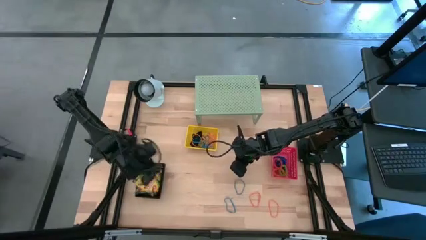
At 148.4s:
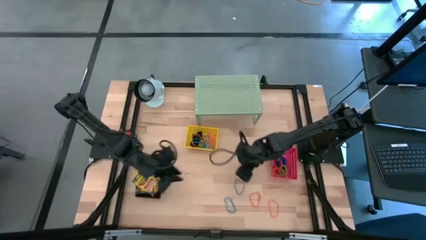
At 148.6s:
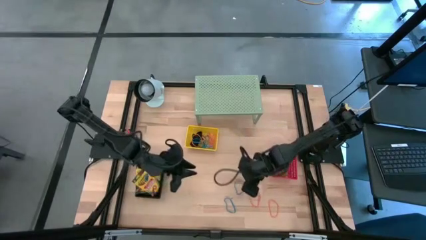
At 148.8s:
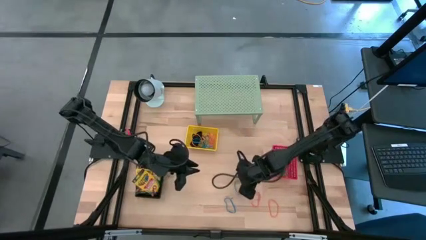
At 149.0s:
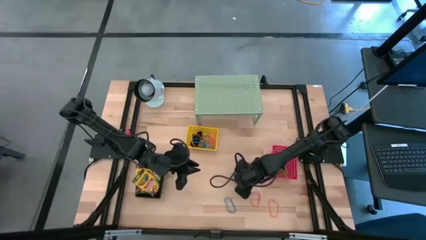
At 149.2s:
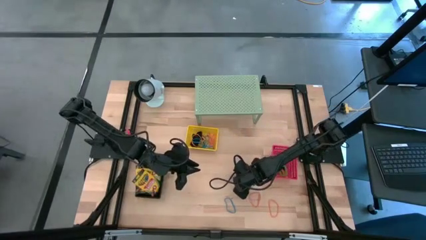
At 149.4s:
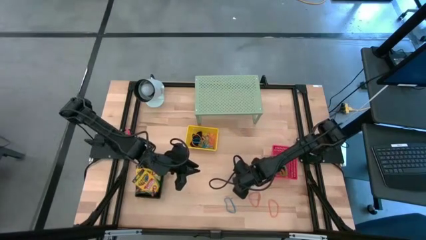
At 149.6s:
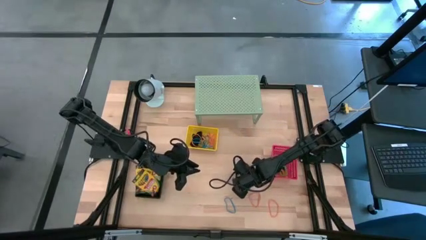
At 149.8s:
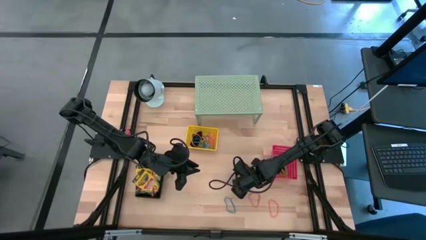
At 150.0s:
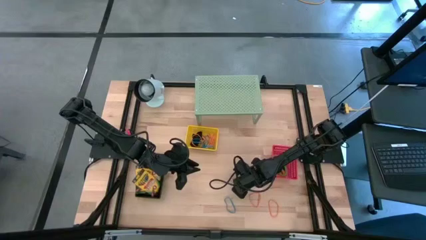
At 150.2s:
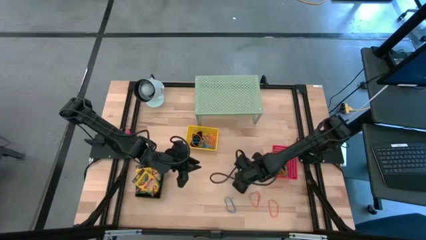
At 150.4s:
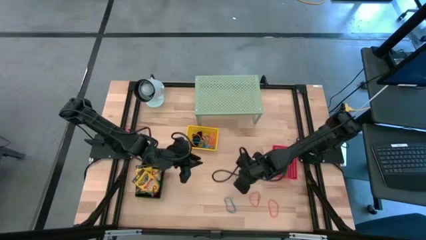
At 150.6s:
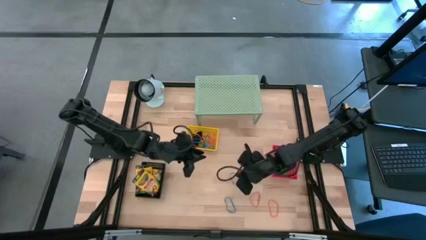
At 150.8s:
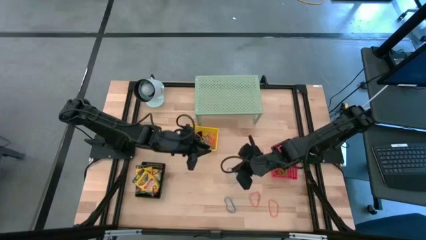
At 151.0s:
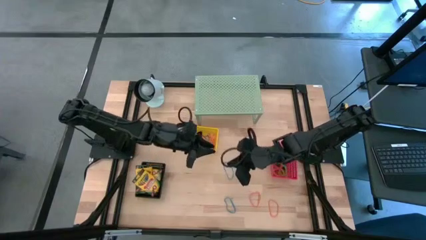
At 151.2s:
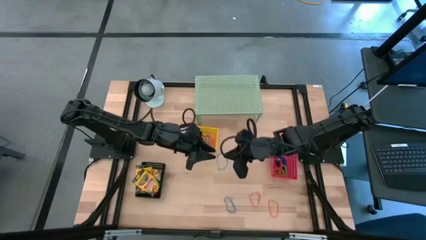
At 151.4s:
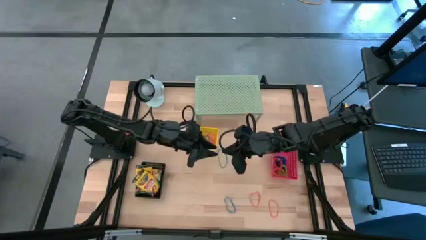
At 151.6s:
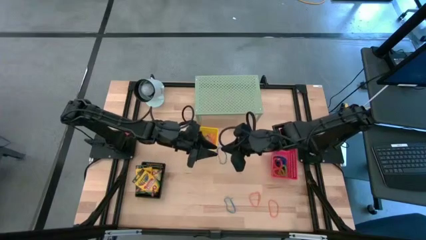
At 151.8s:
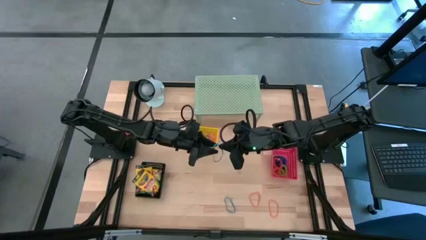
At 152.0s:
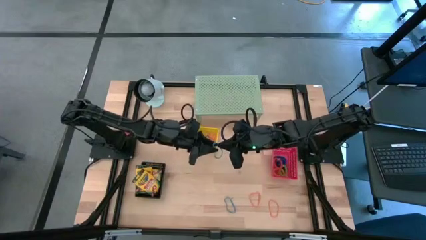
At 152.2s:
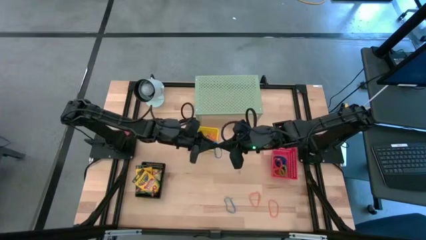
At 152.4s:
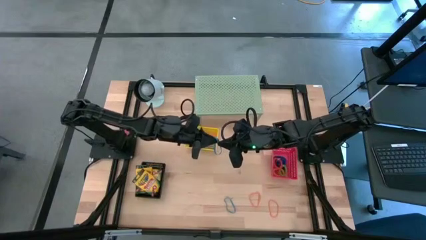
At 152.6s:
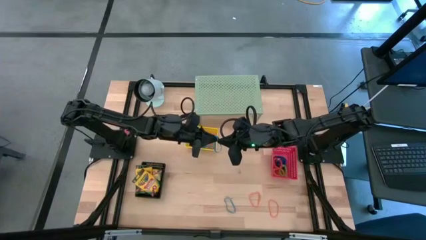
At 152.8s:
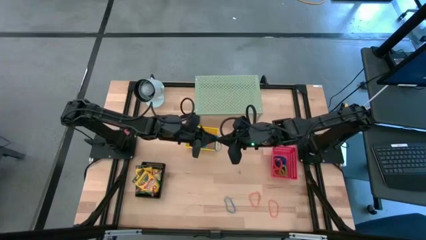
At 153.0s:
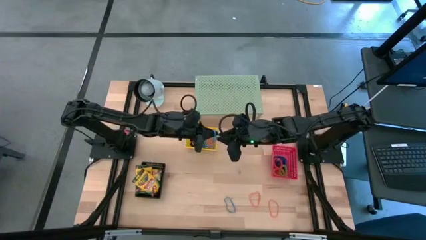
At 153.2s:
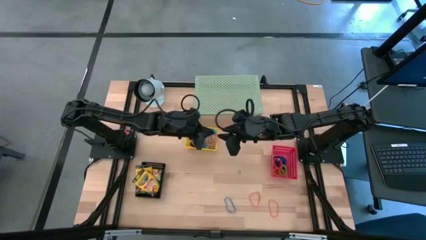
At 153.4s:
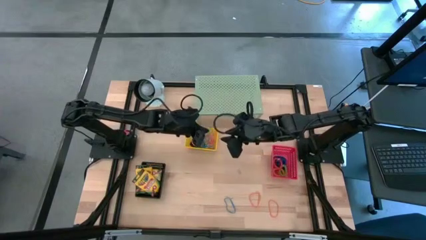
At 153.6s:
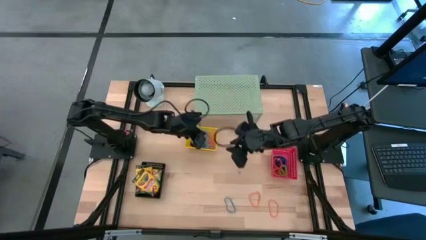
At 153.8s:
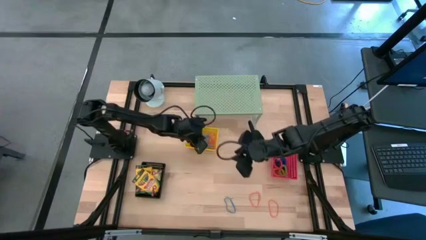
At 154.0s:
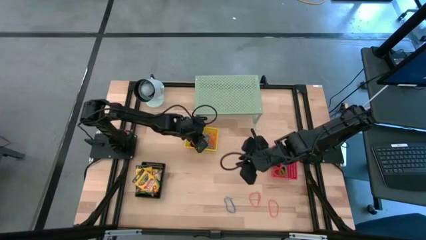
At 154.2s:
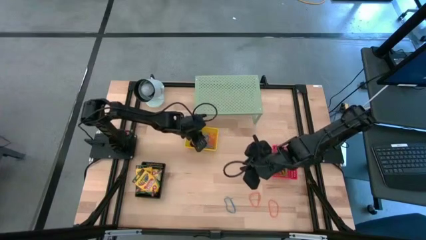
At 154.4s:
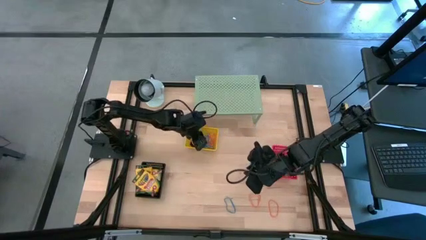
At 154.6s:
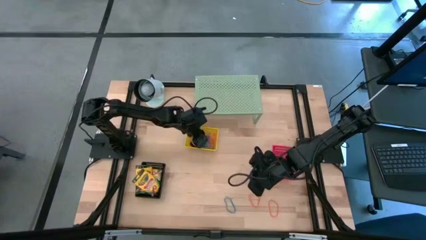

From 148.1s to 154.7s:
Task: Pick & Place Office Desk Supplies
Put the blue rubber band into the yellow bin

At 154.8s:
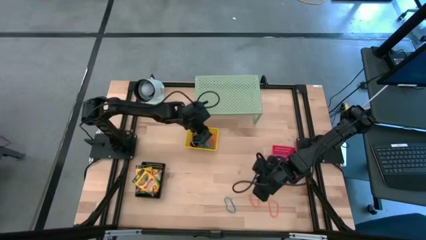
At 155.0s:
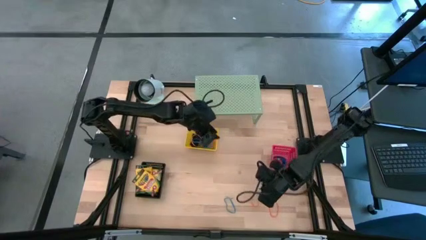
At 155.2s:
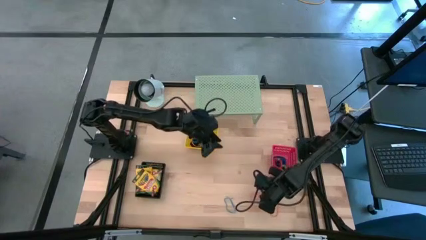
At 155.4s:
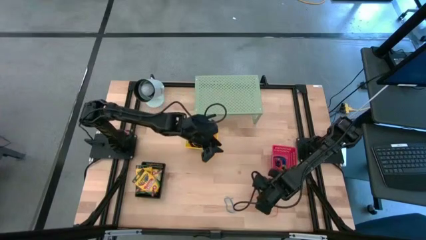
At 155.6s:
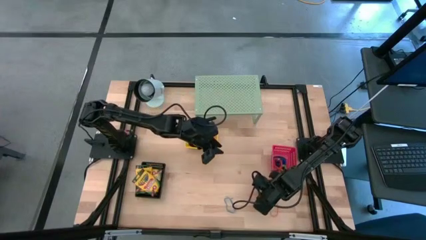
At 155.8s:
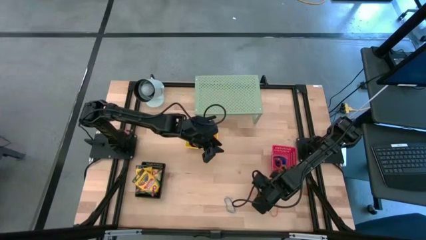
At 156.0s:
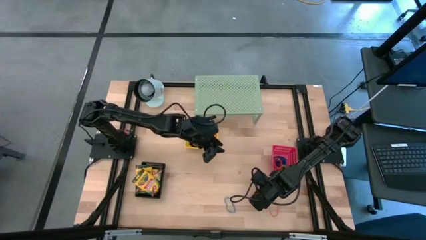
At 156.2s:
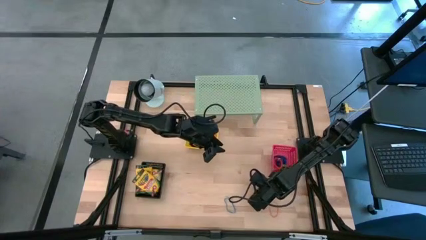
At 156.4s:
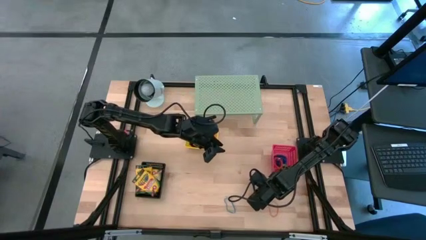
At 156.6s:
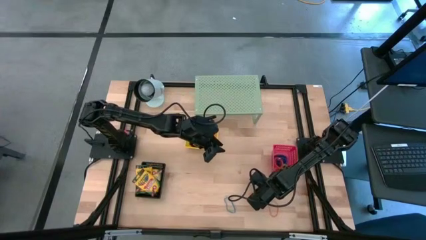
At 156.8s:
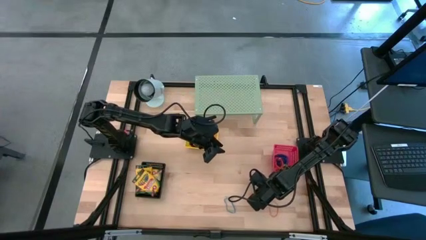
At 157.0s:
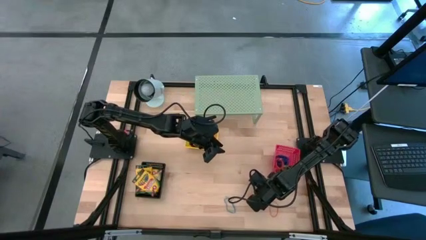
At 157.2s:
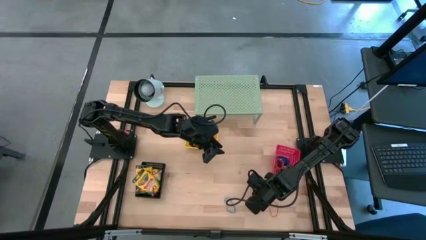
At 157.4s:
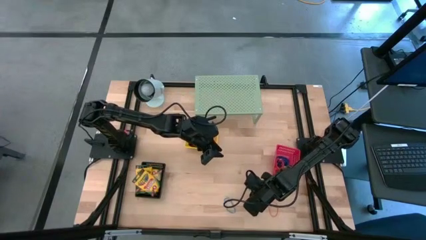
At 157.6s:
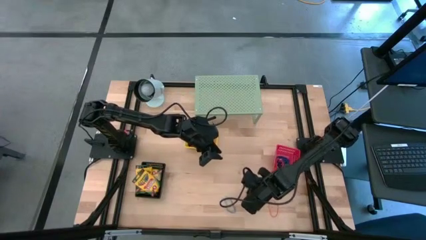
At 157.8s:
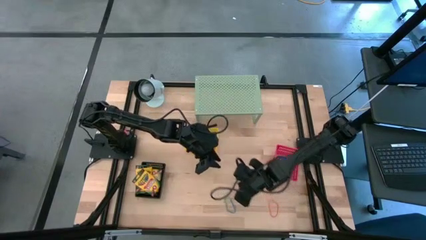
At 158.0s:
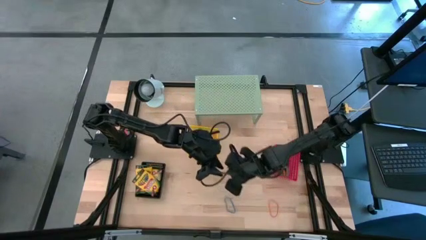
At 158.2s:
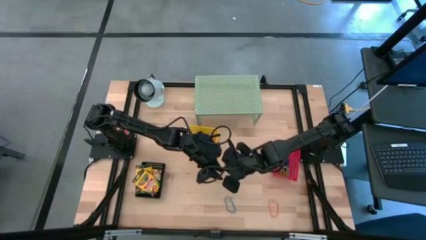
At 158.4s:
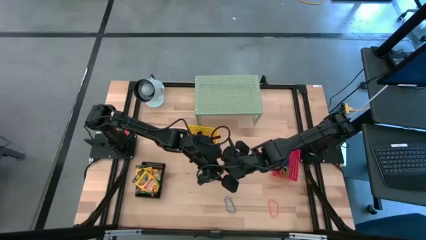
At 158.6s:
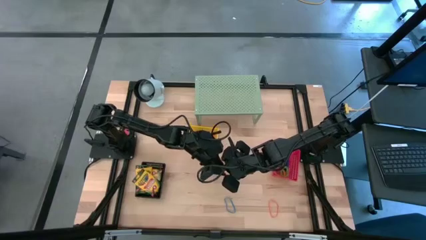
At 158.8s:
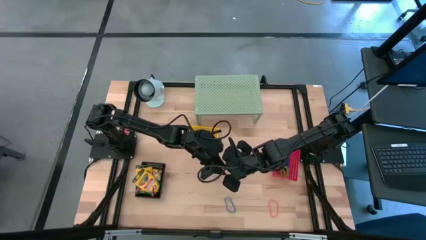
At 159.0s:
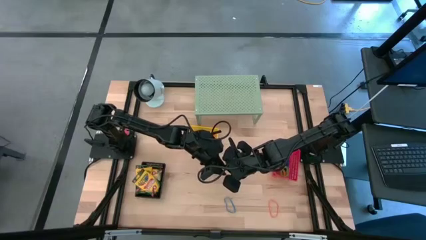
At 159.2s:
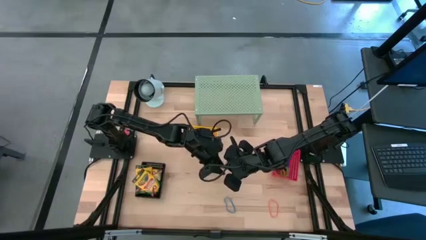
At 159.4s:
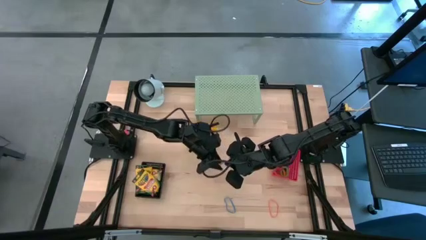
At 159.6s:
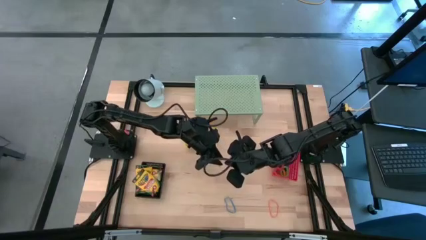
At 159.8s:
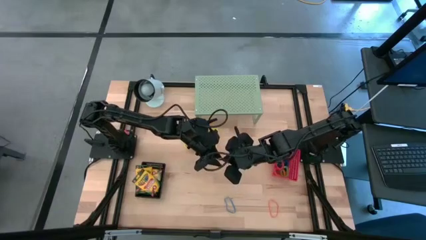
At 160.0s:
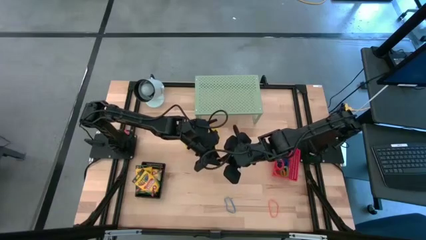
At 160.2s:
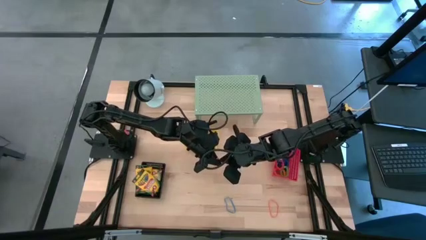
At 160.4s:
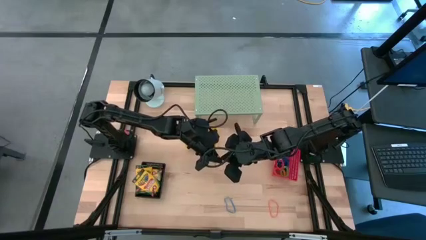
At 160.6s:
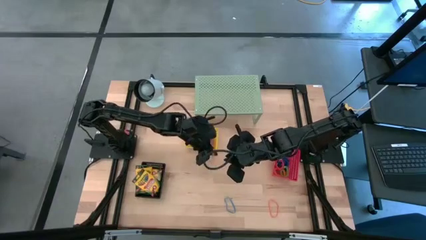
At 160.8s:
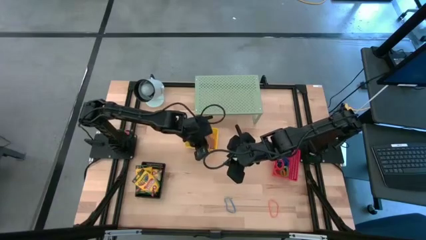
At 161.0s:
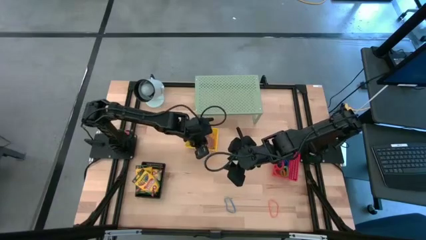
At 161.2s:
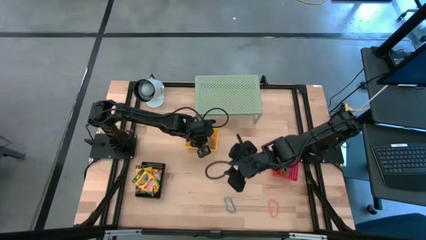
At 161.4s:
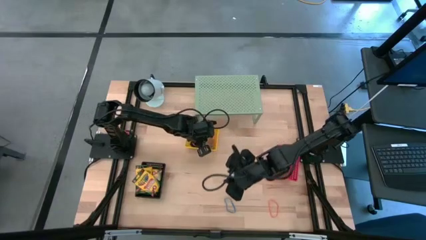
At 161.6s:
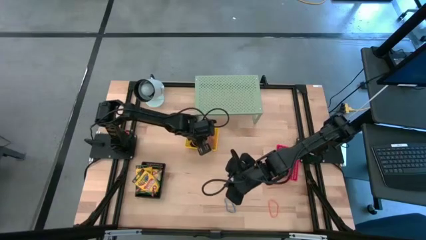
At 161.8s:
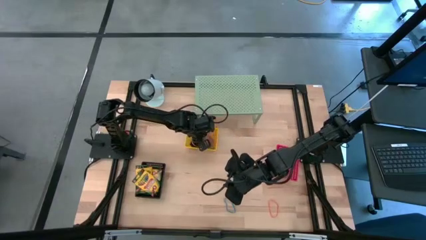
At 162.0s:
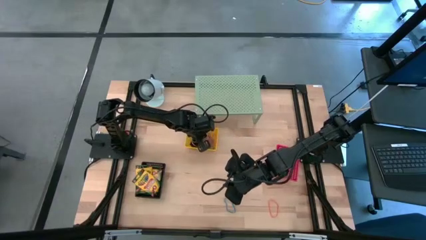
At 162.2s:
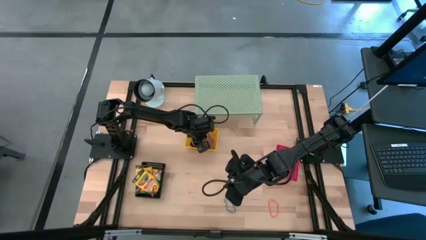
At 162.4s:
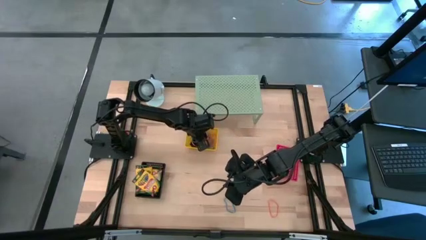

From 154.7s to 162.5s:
Put the orange rubber band into the yellow bin

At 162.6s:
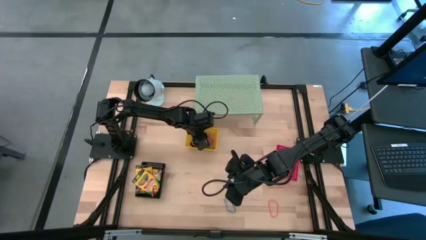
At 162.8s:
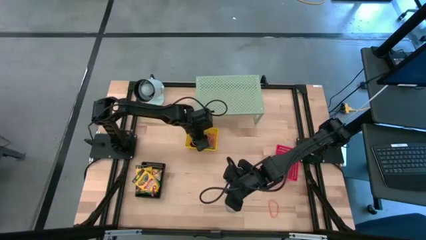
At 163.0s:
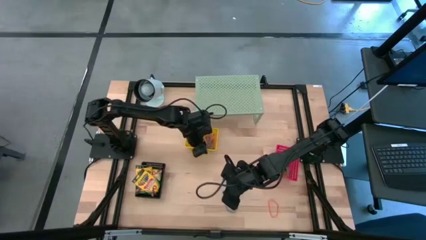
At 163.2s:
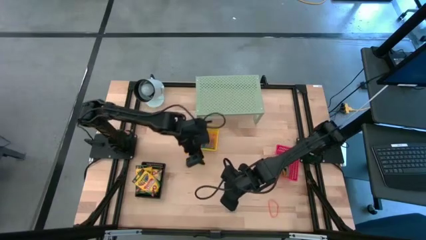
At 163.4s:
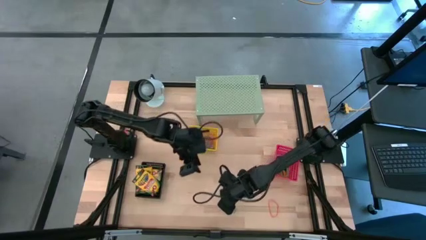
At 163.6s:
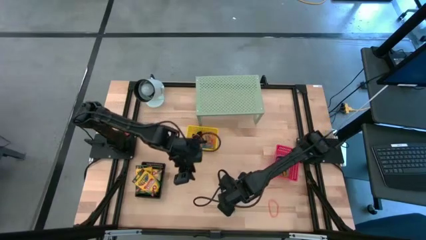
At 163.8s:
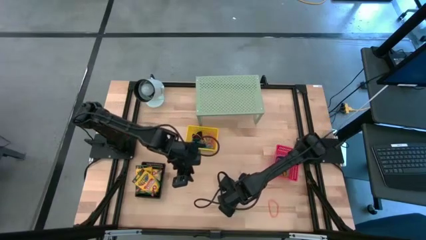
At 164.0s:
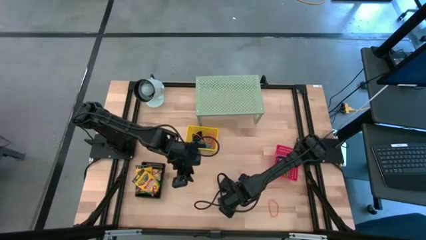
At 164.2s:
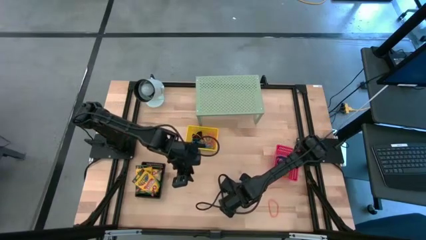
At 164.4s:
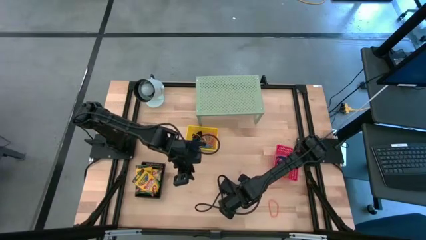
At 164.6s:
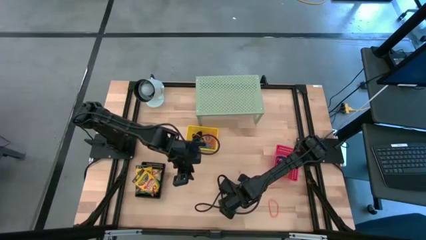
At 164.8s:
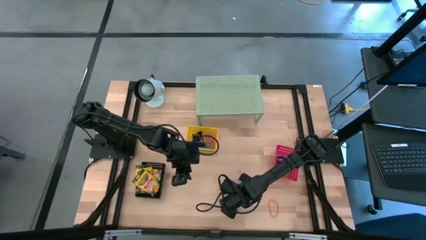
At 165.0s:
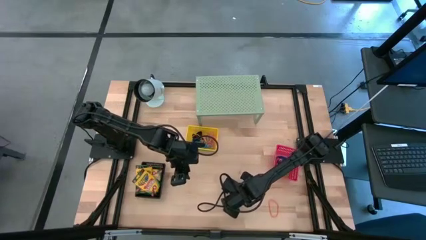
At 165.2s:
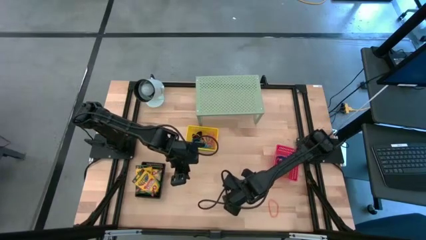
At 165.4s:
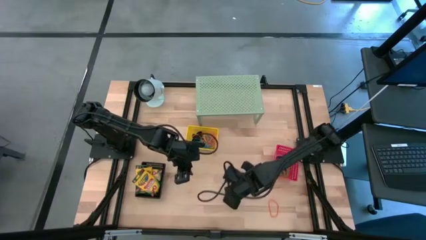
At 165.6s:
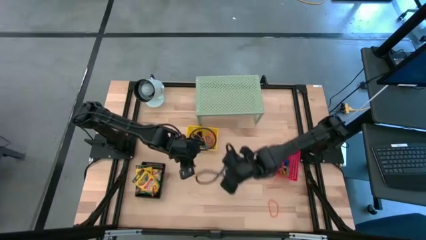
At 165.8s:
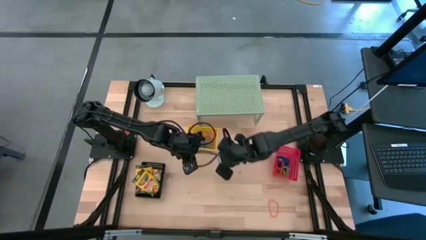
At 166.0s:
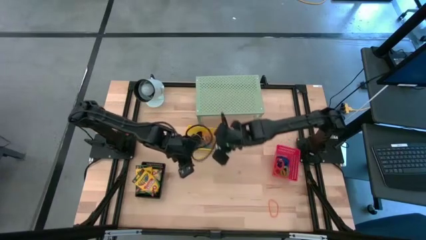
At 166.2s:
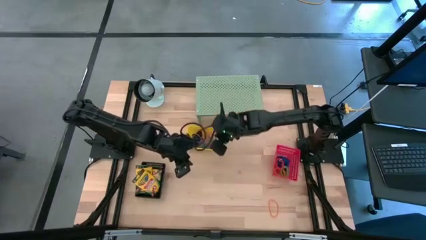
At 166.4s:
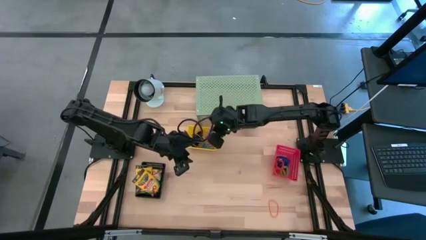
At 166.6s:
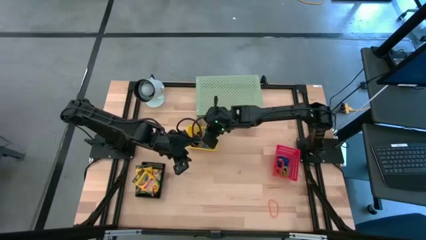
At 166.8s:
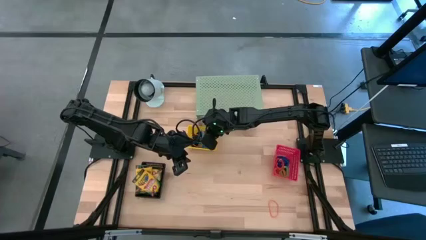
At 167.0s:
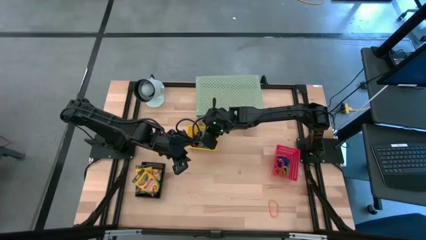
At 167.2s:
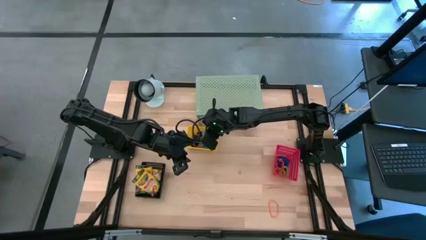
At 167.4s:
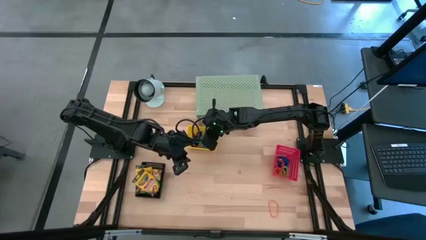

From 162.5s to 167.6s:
Put the blue rubber band into the yellow bin
